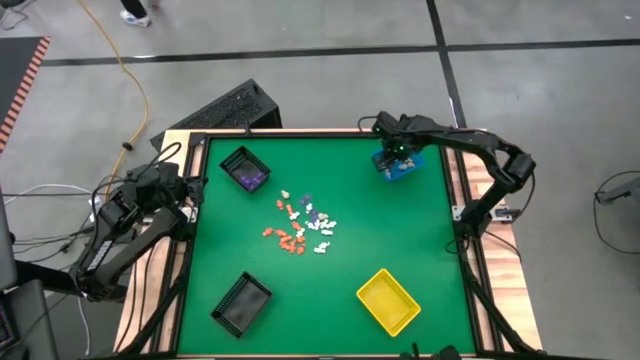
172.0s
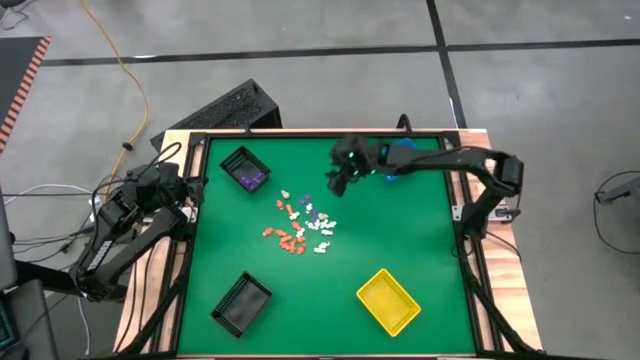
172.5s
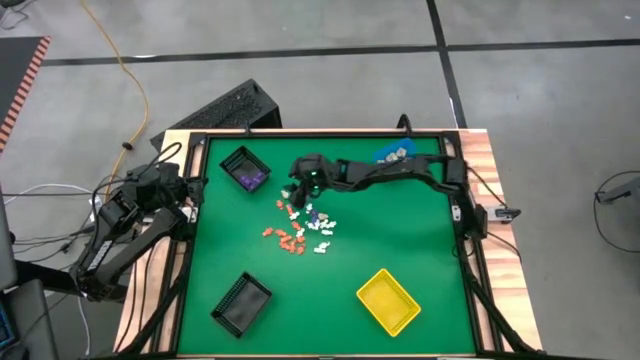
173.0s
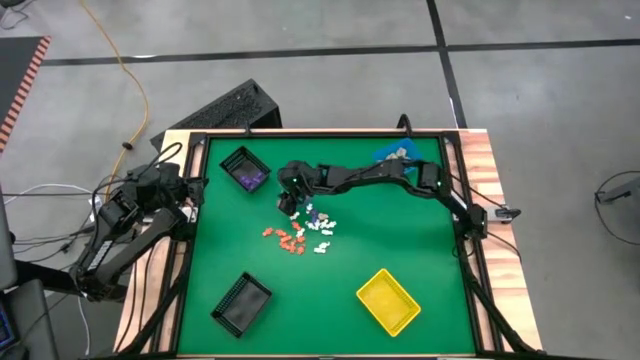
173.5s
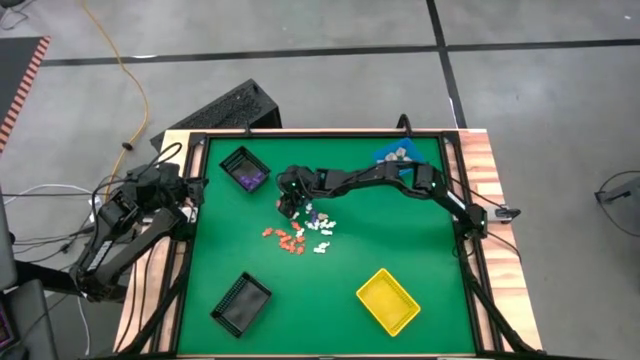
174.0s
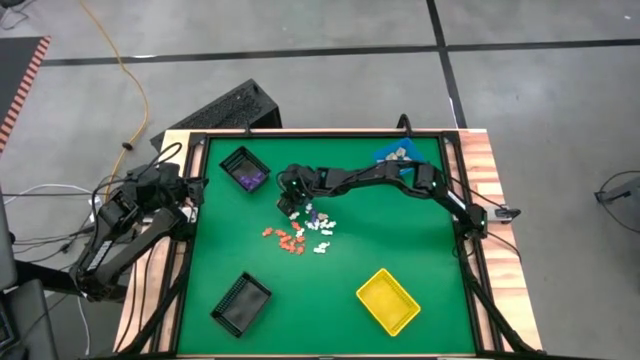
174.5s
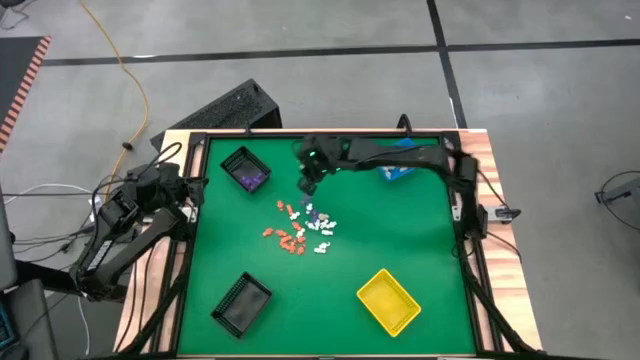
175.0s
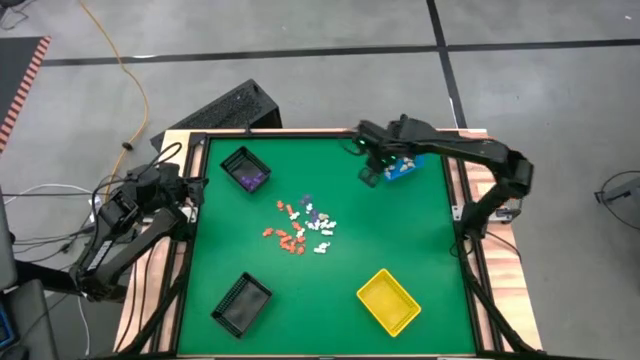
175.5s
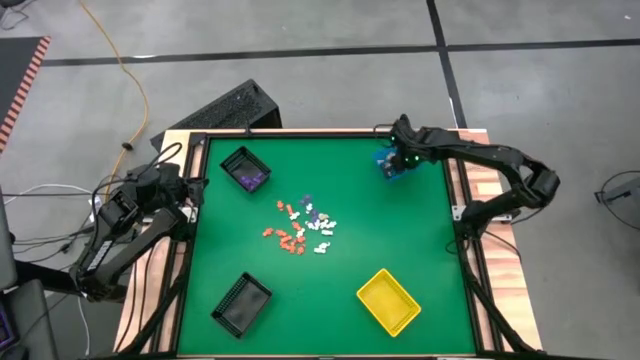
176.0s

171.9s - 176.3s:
Task: Sort Halloween decoration
Put the skull toy into the blue basket

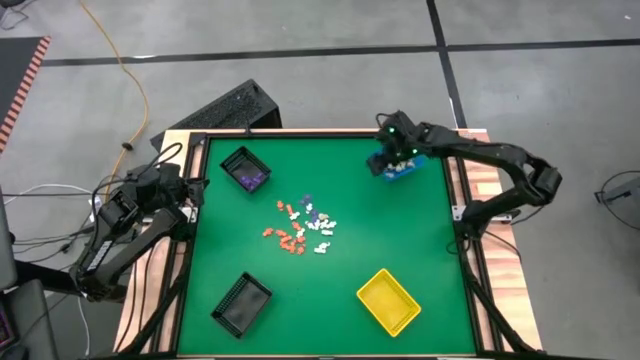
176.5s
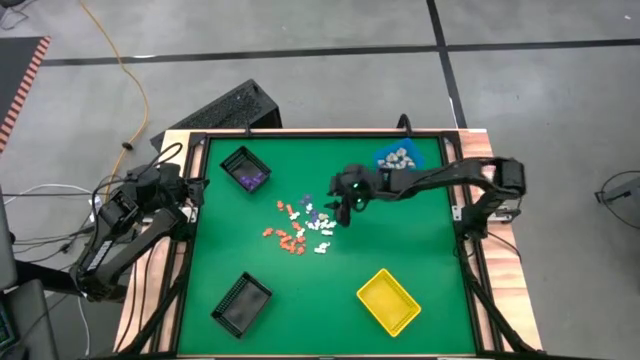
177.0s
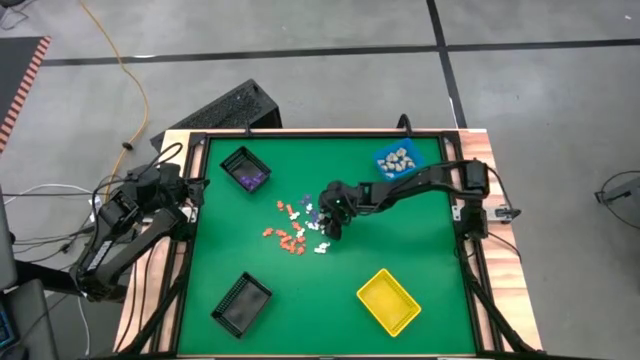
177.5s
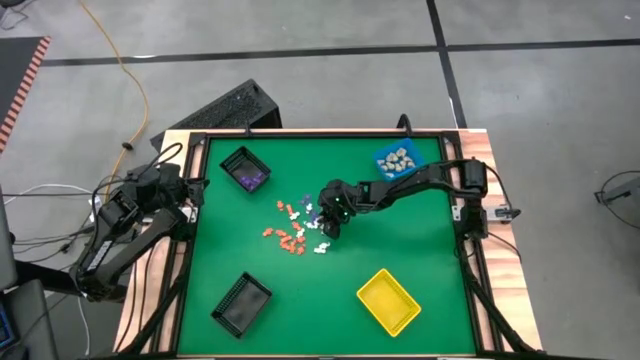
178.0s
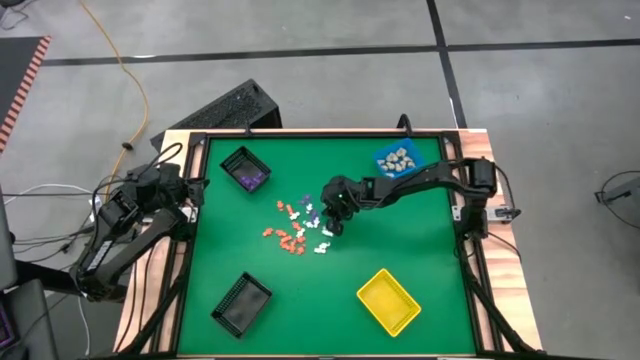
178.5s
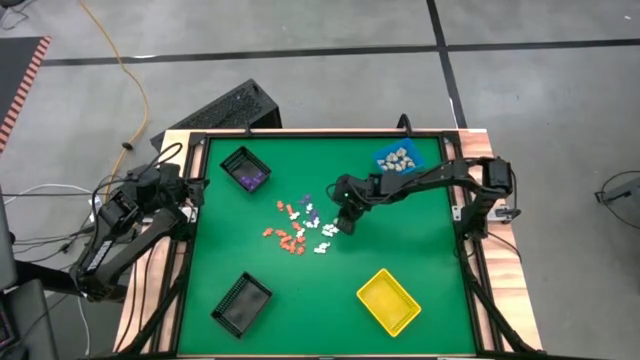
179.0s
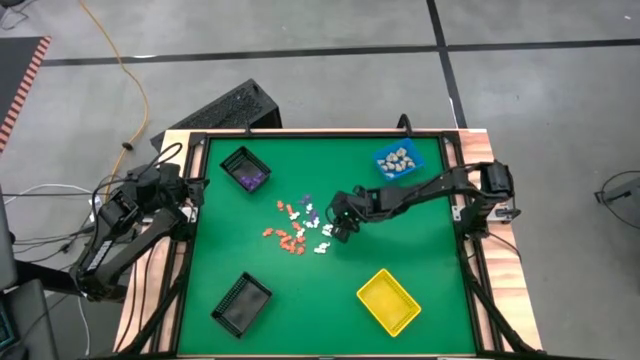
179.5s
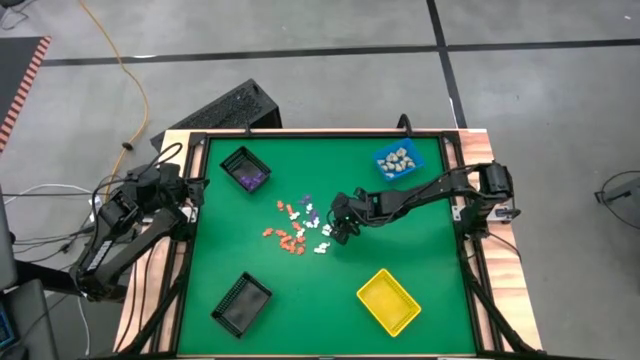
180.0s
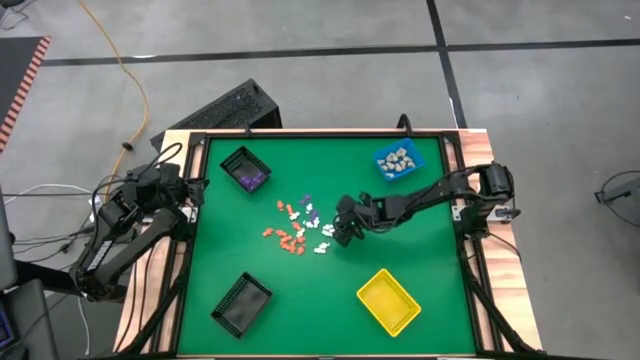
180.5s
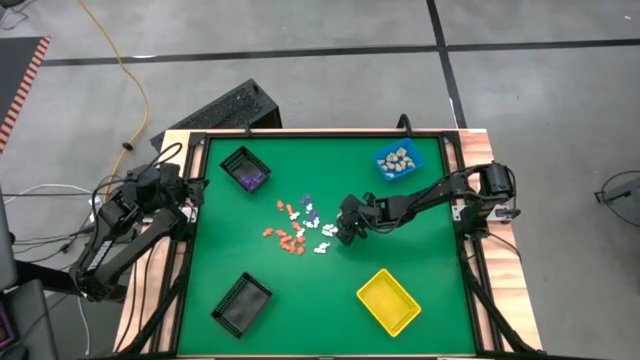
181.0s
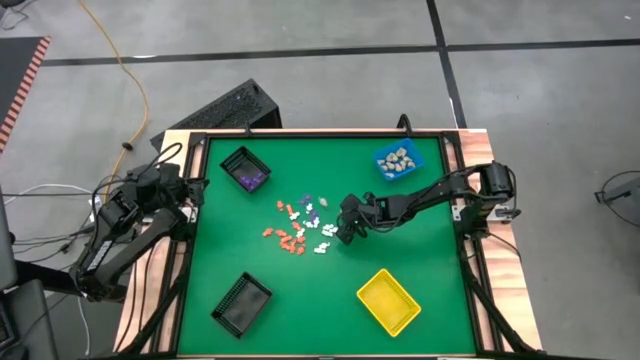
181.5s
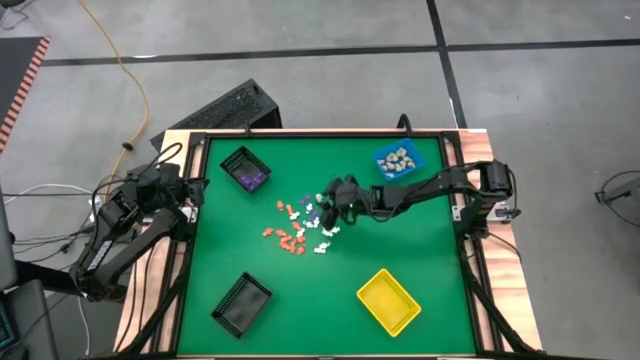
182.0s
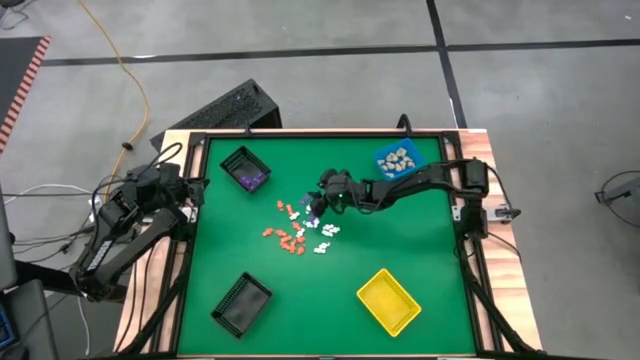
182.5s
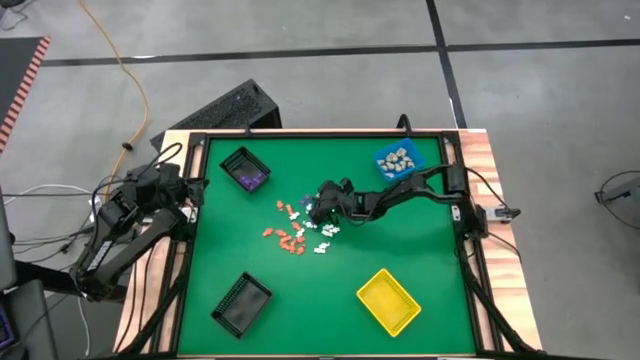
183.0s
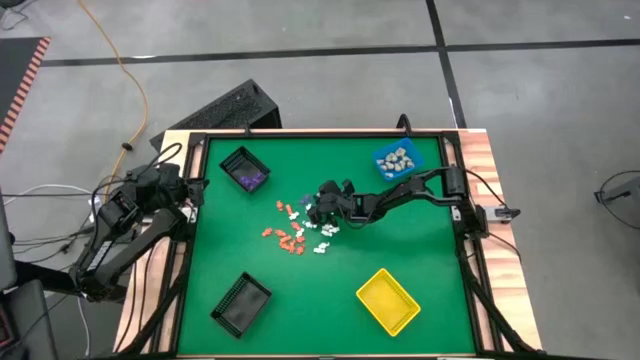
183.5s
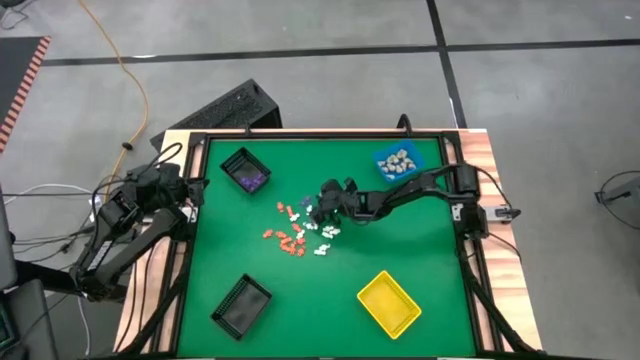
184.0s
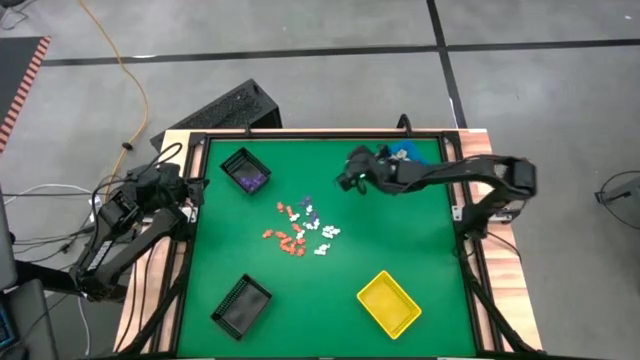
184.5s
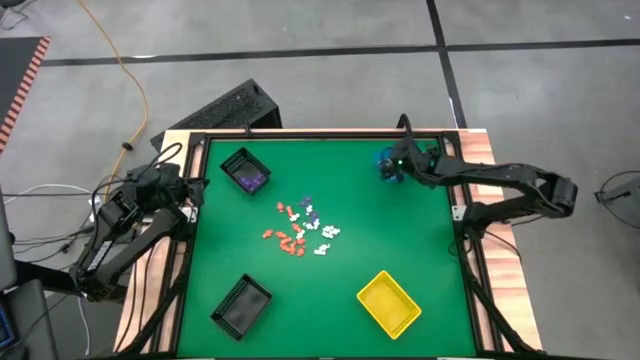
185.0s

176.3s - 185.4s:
Put the skull toy into the blue basket

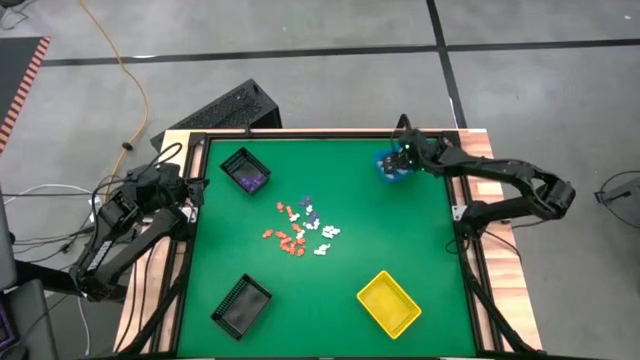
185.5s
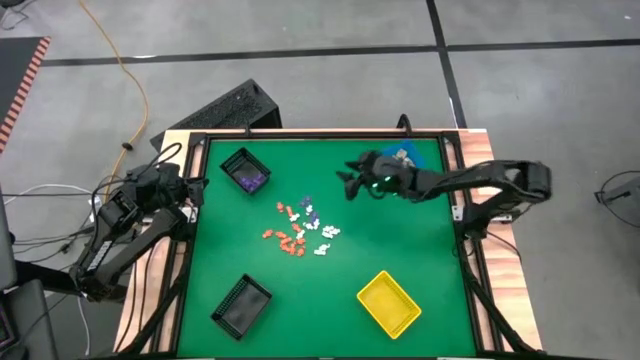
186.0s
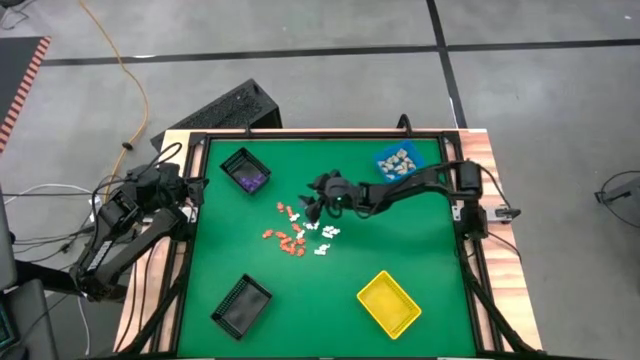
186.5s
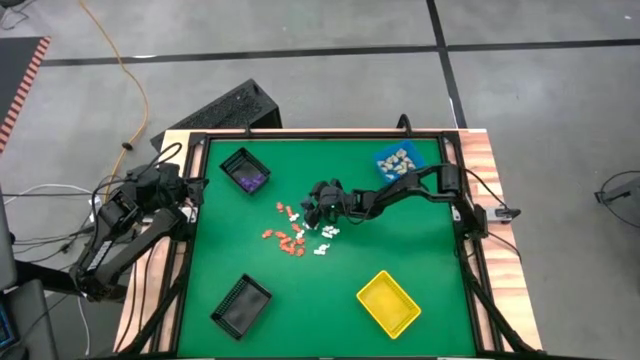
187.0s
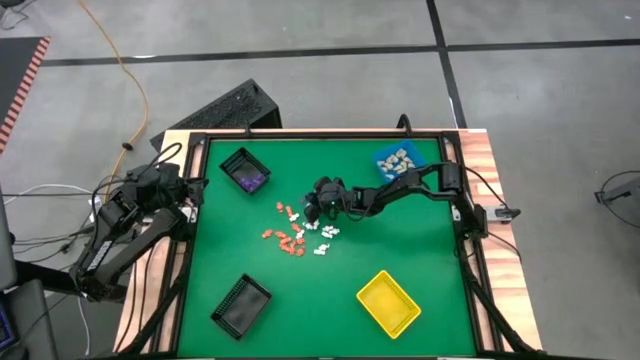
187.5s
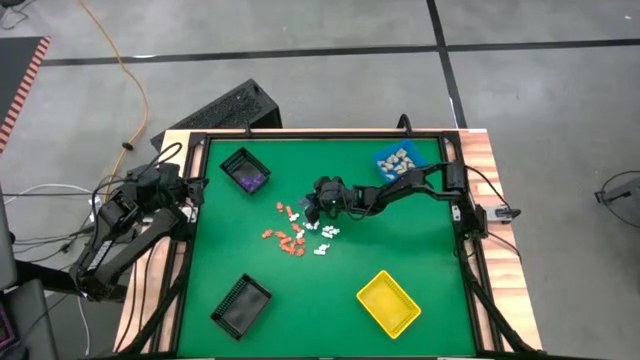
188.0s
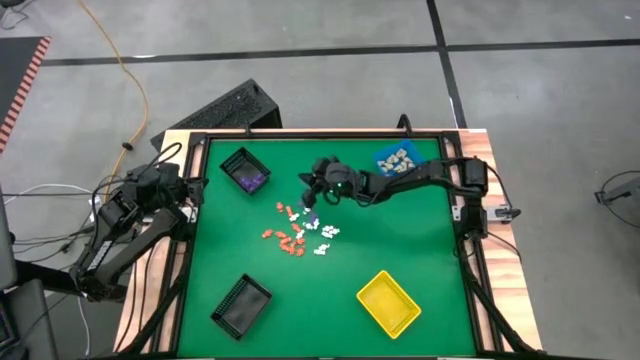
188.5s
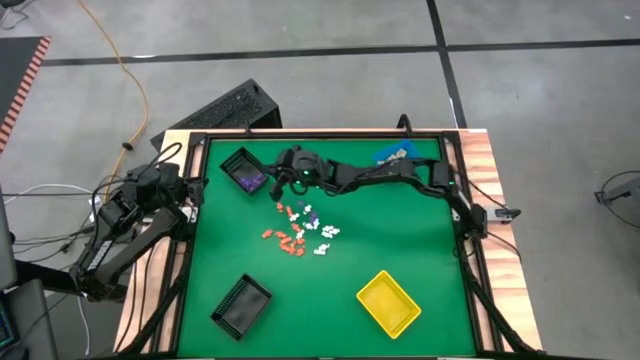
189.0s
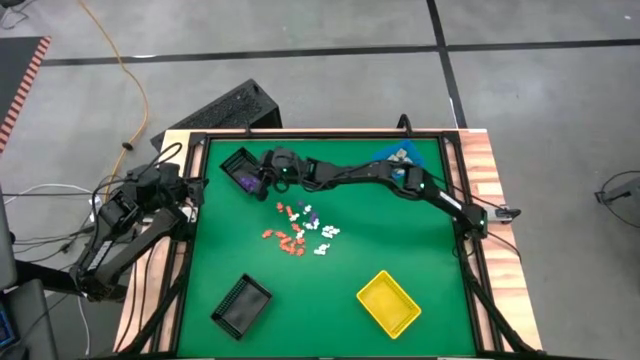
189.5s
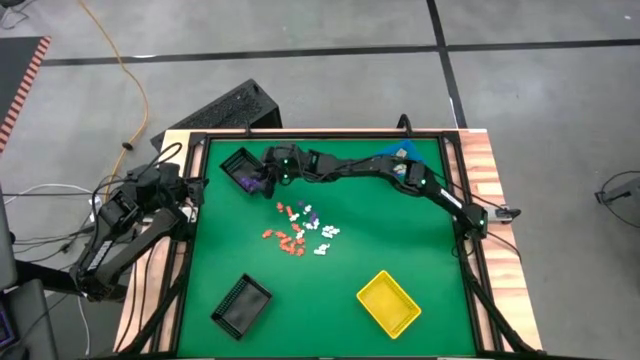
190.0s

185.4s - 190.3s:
Put the purple spider toy into the top black basket

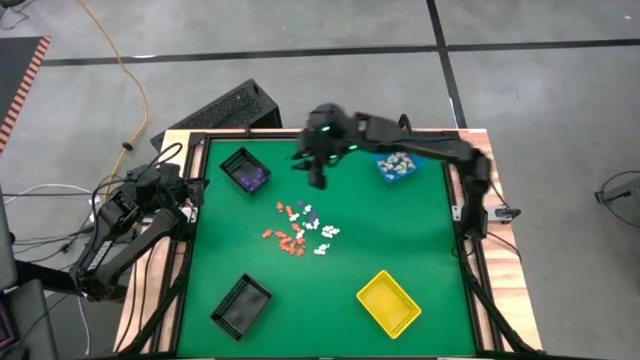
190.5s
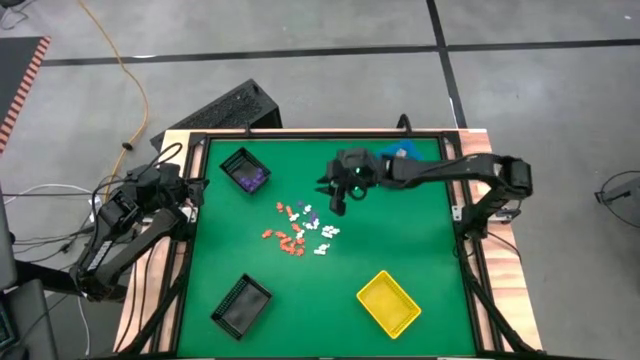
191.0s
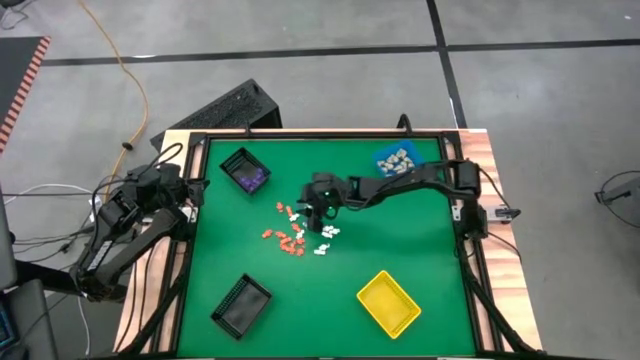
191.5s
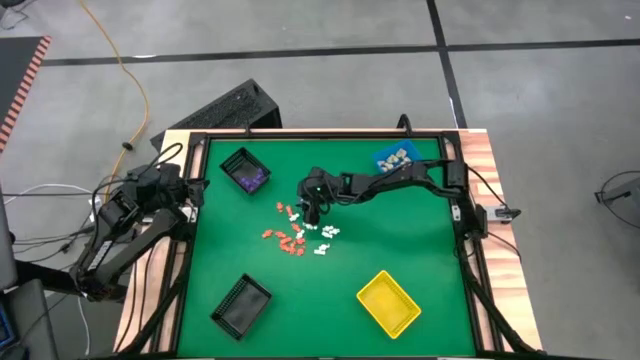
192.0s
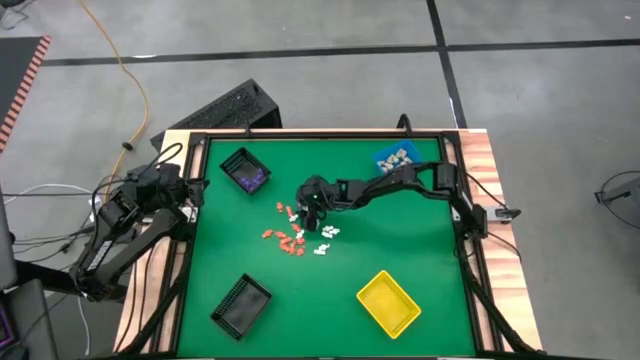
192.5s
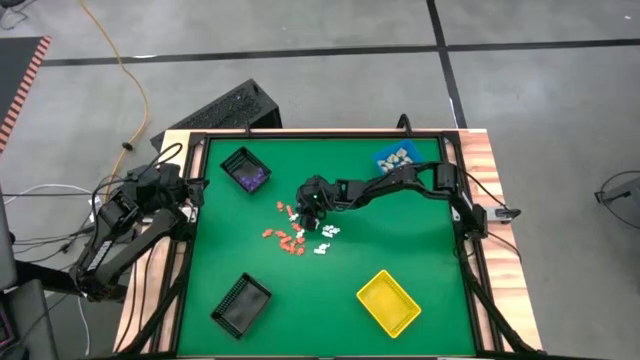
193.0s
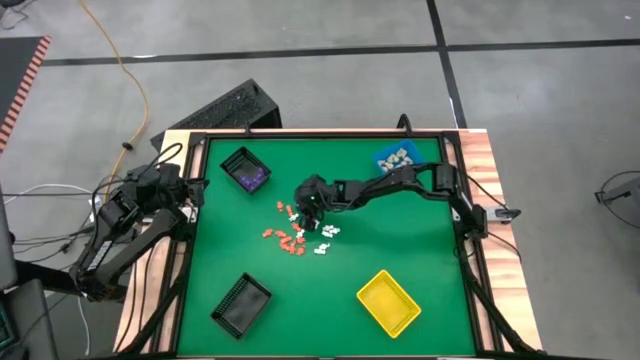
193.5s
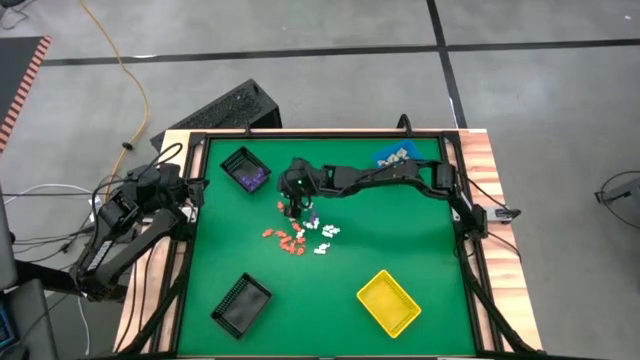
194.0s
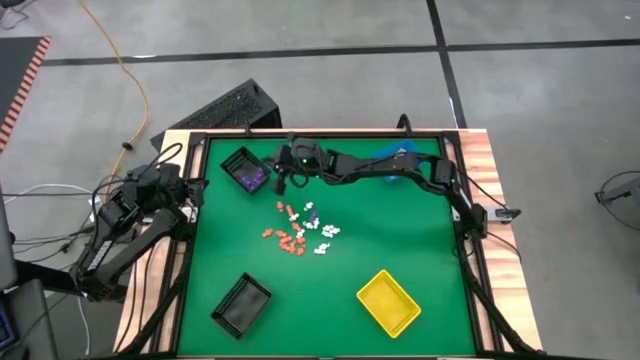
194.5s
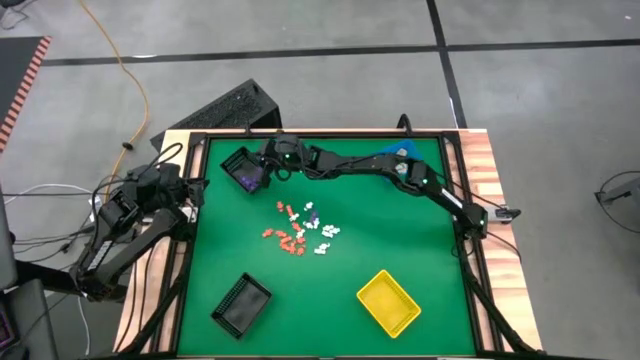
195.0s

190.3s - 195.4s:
Put the purple spider toy into the top black basket
